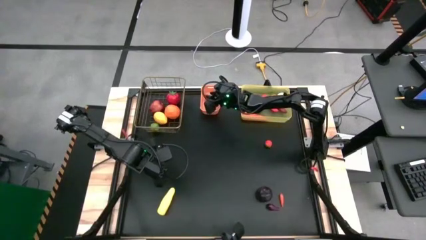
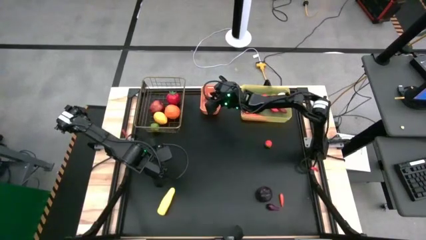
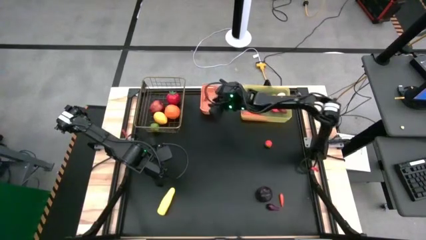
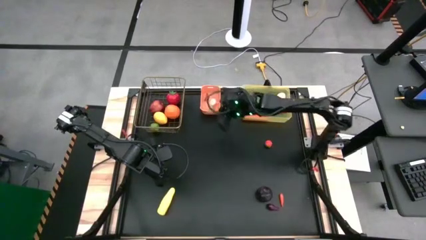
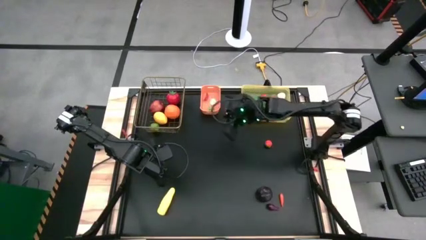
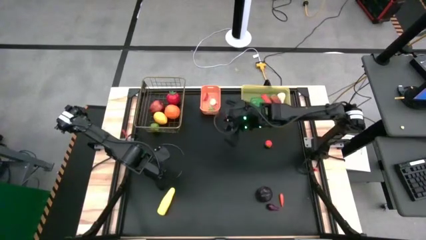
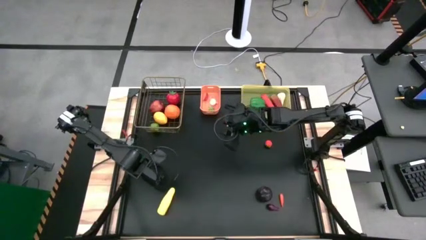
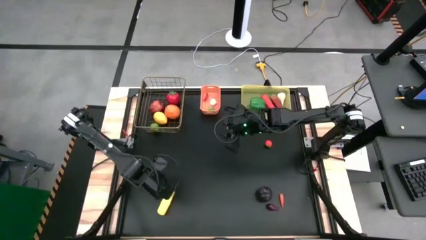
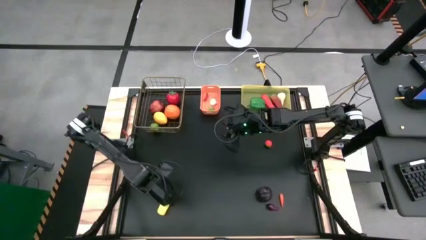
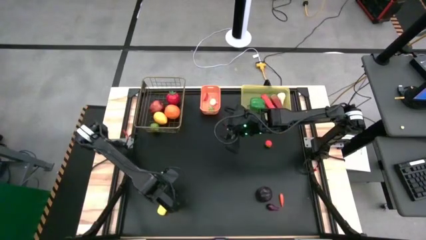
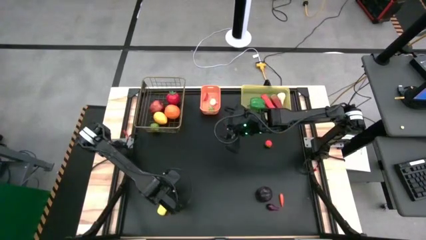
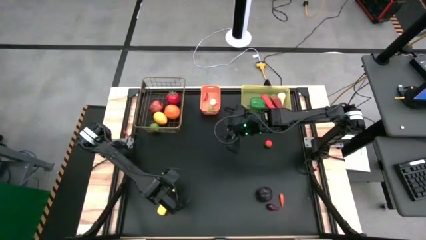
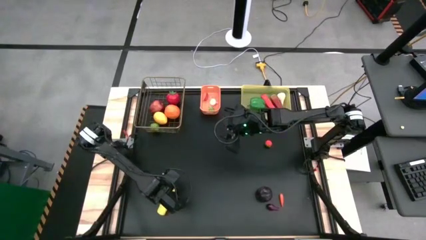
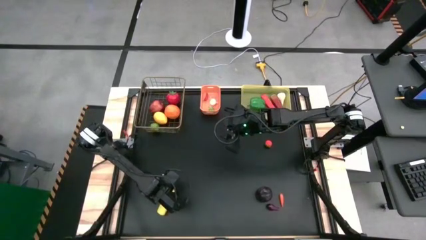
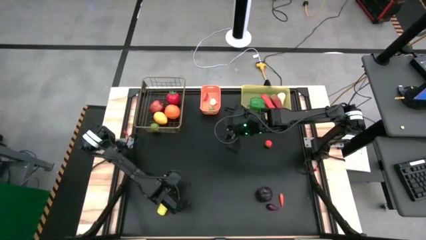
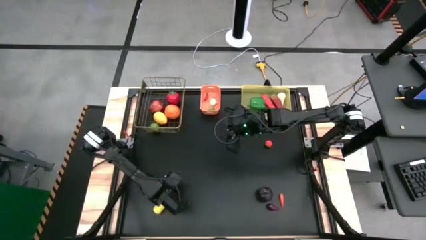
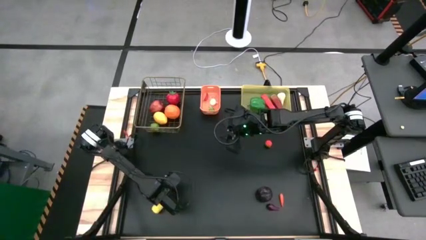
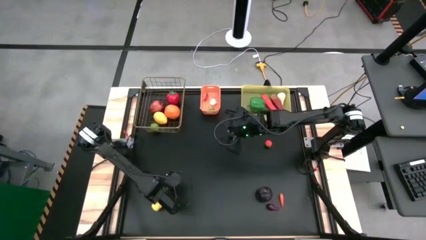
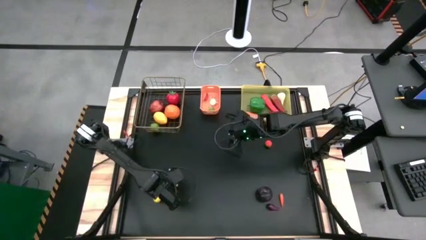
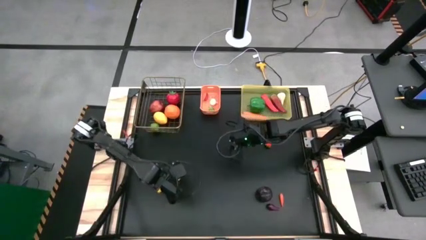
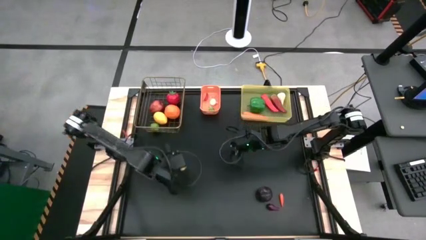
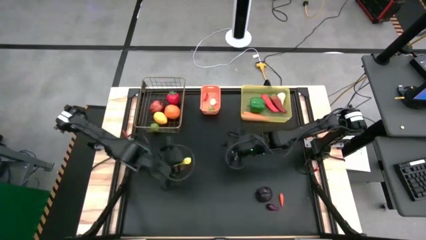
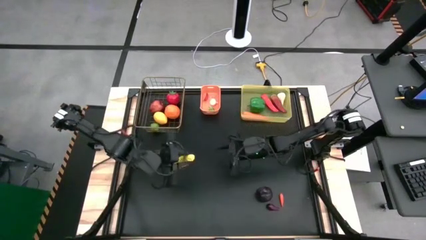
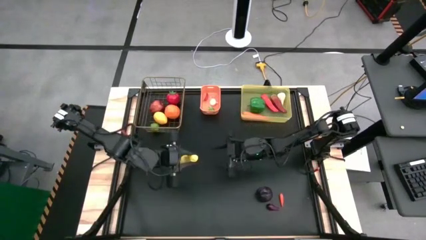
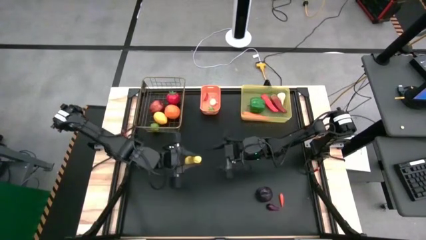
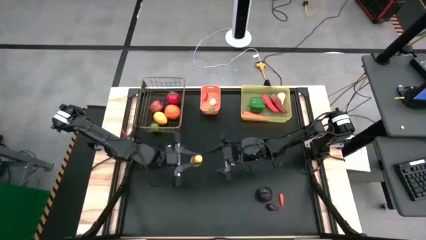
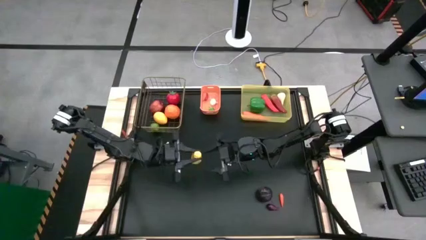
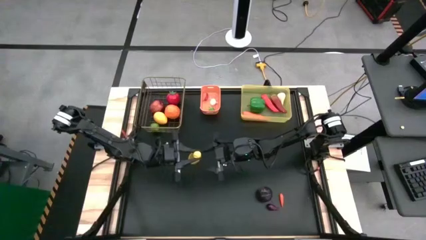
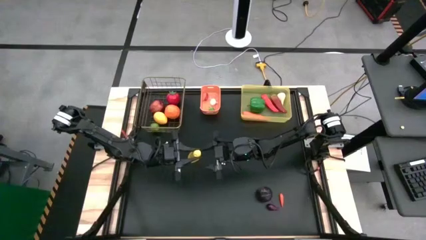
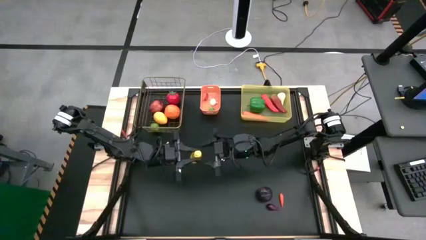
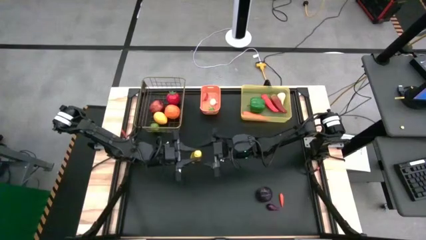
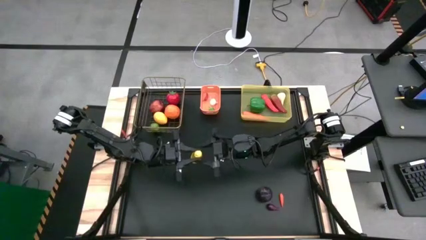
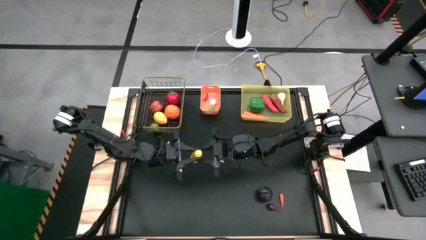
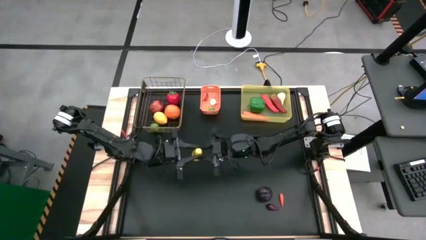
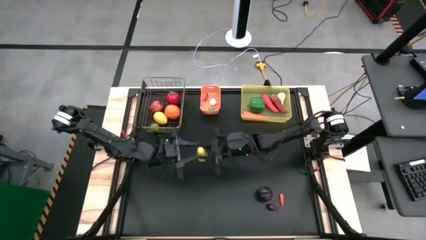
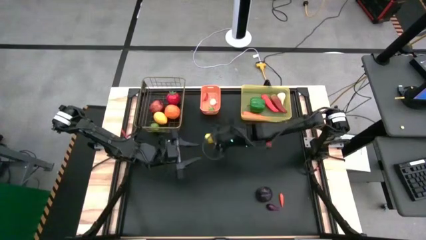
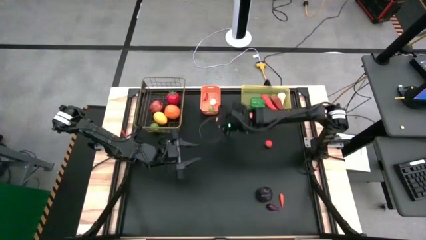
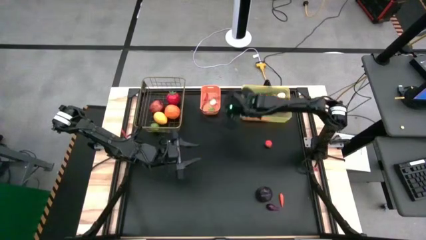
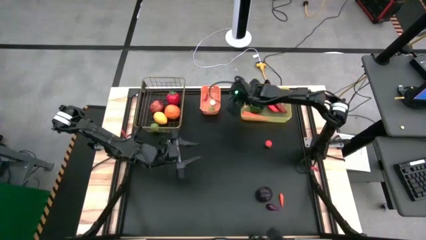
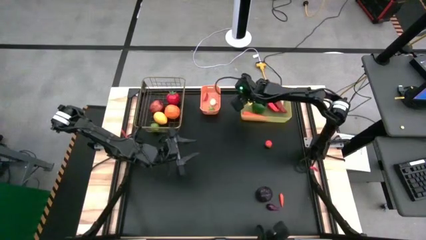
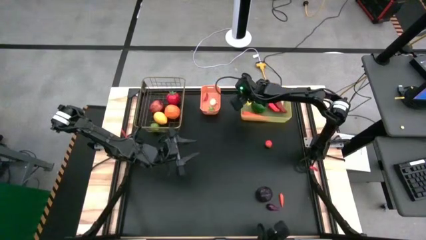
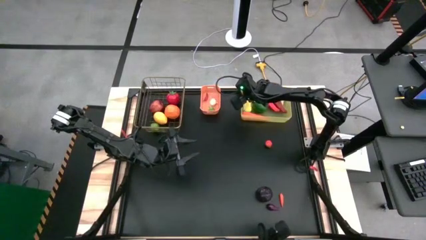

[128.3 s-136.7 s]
Task: Sort produce into baskets
Put the yellow corn into the yellow bin

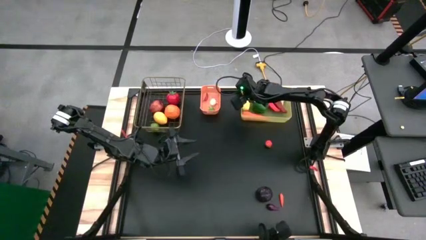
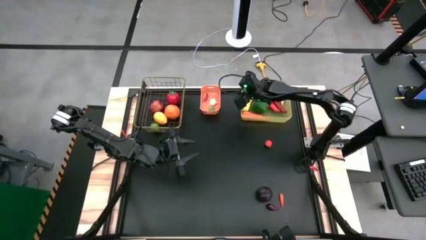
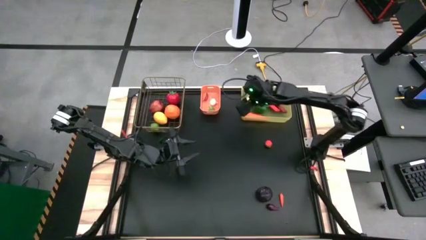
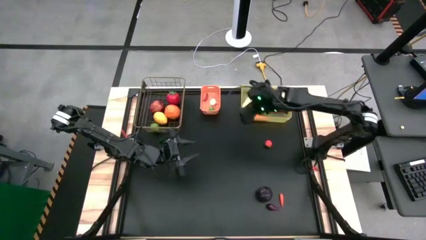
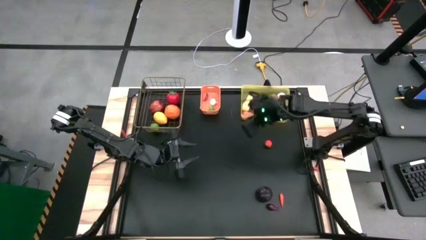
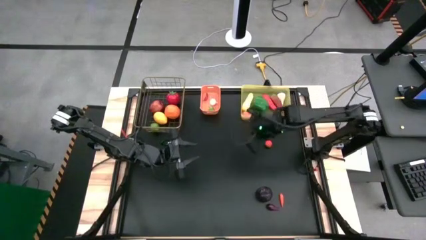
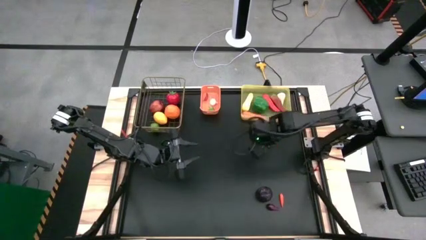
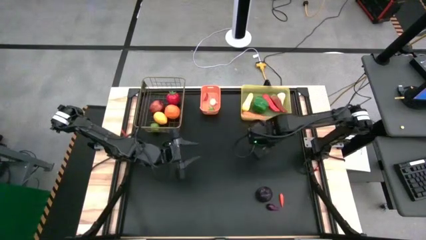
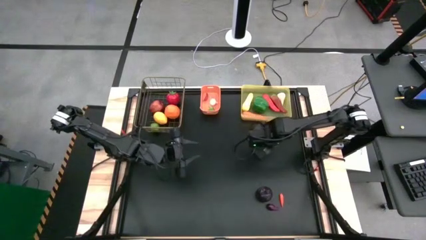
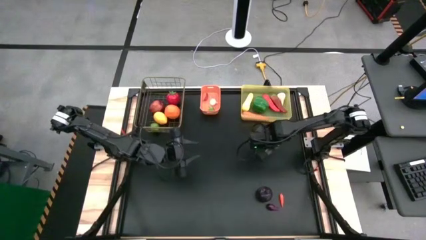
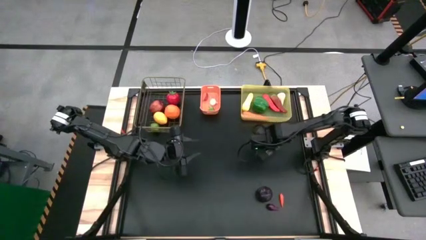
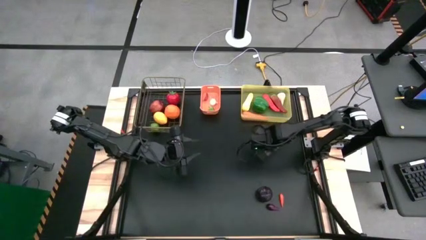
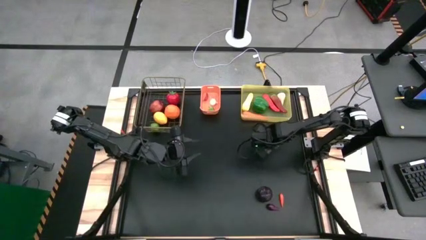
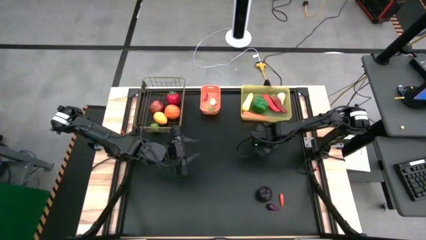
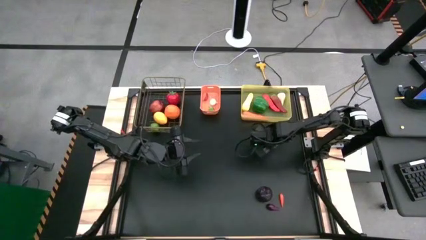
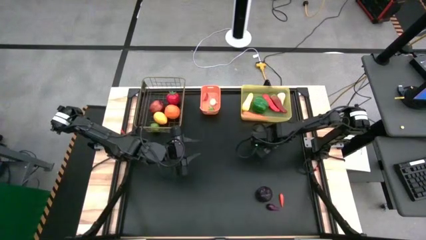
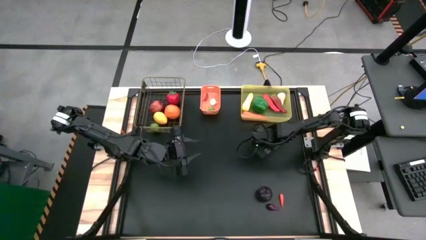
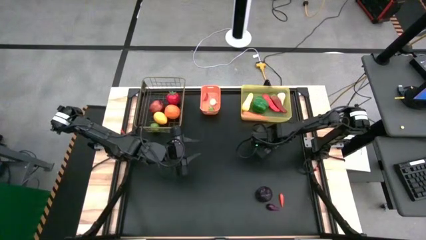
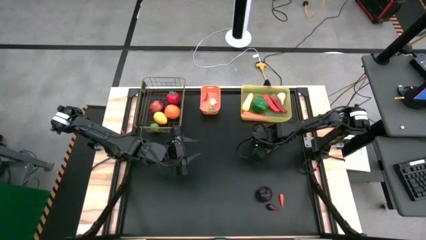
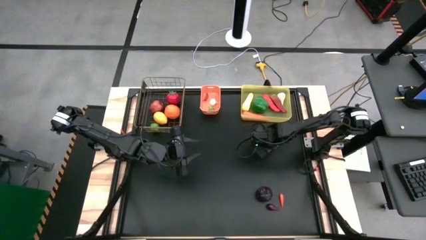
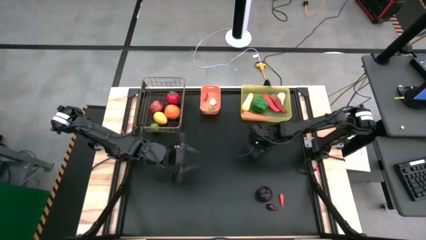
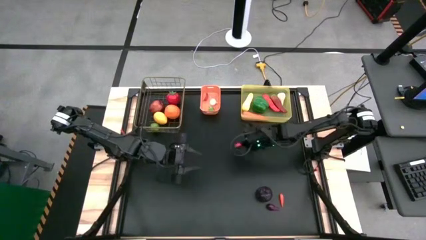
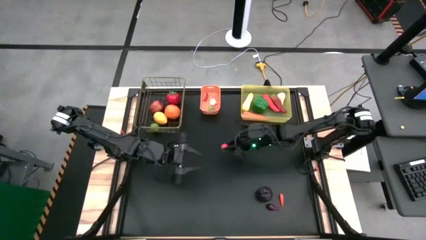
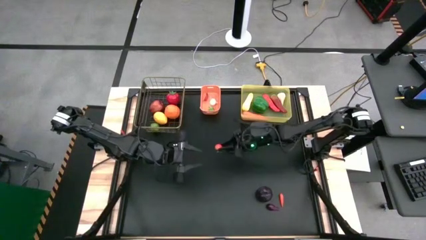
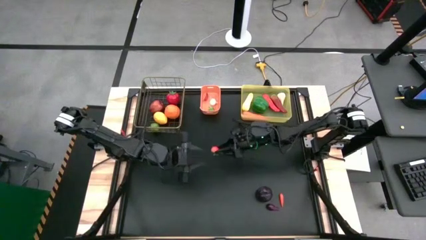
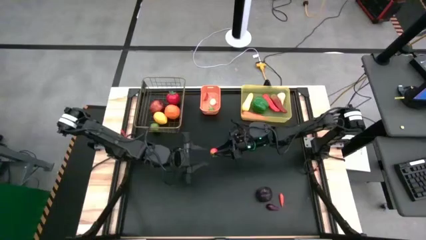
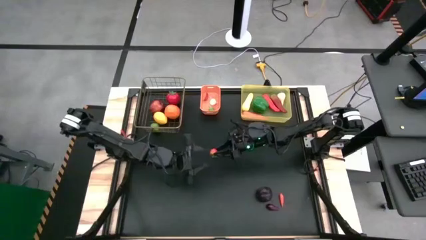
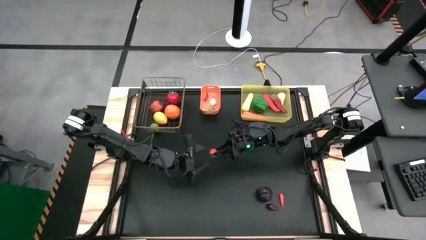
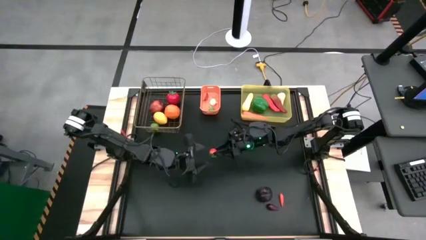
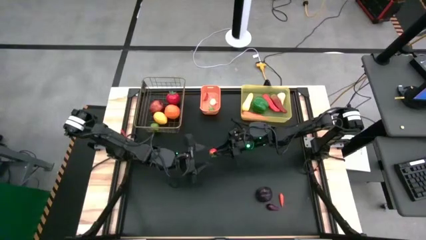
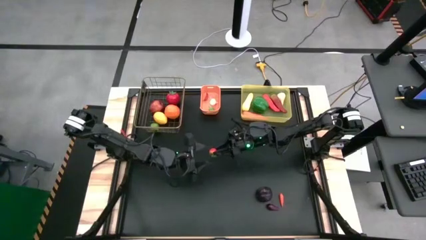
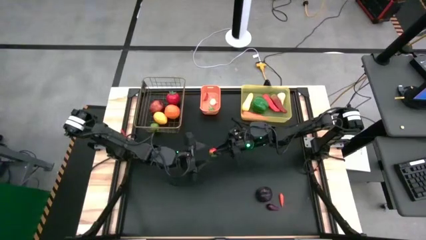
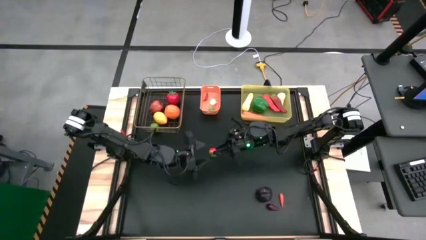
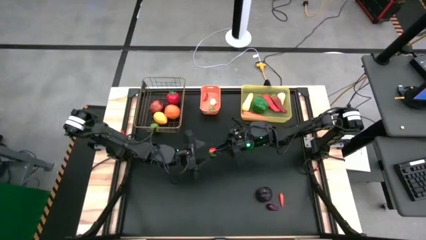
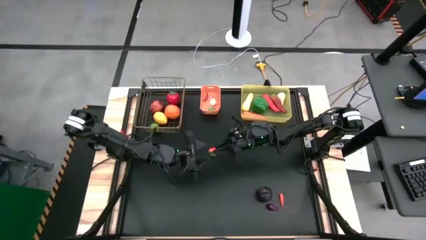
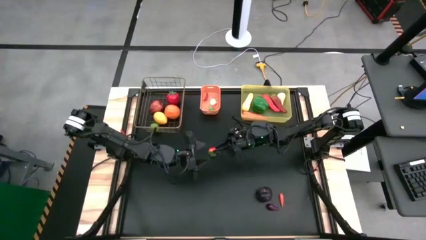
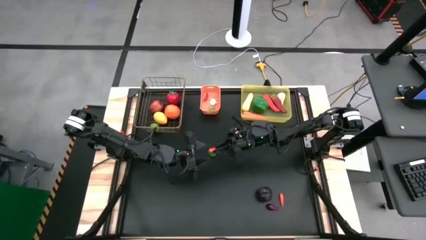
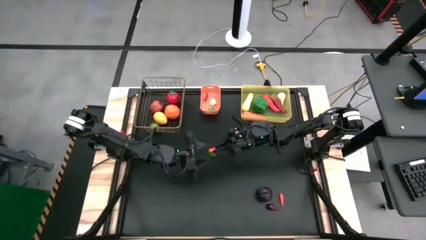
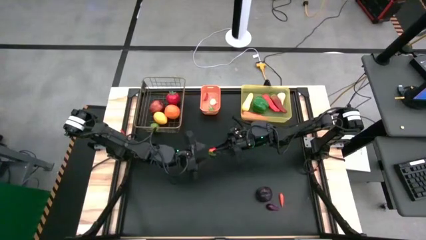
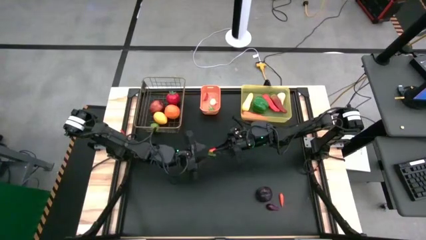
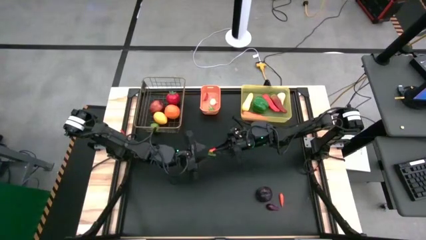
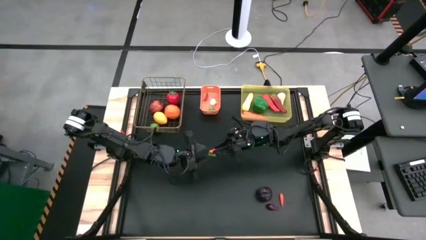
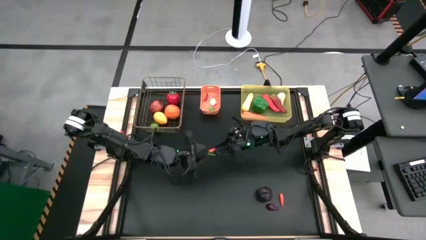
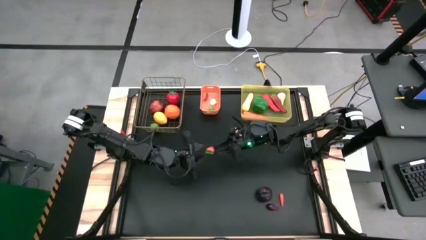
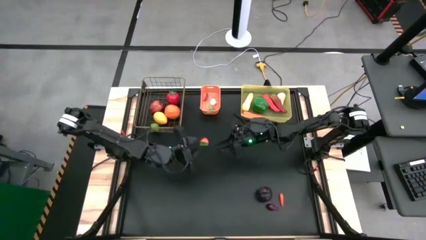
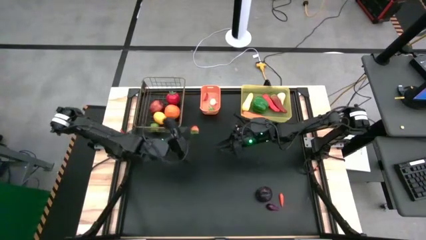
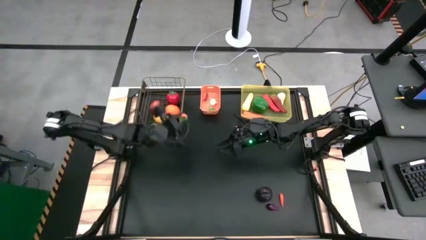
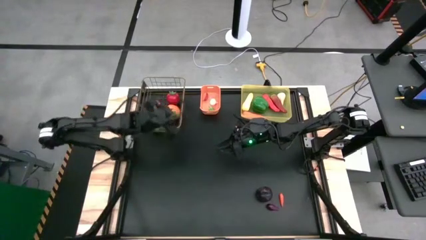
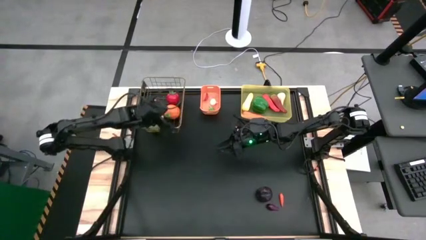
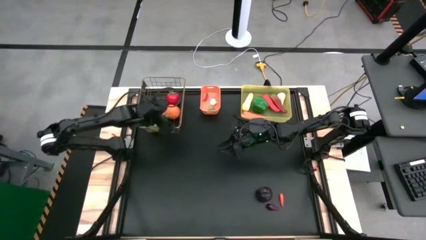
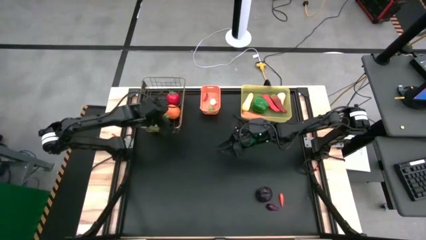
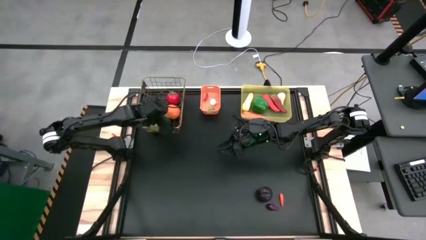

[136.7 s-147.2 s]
Put the orange cherry tomato into the wire basket
